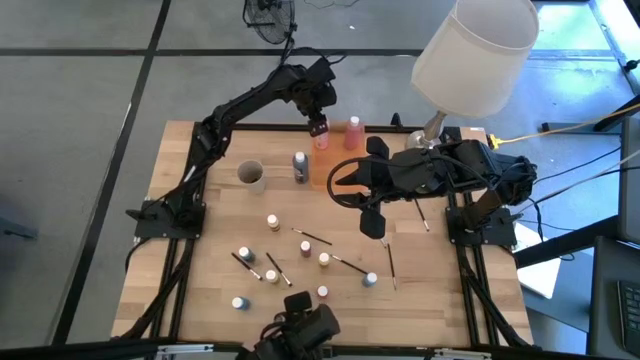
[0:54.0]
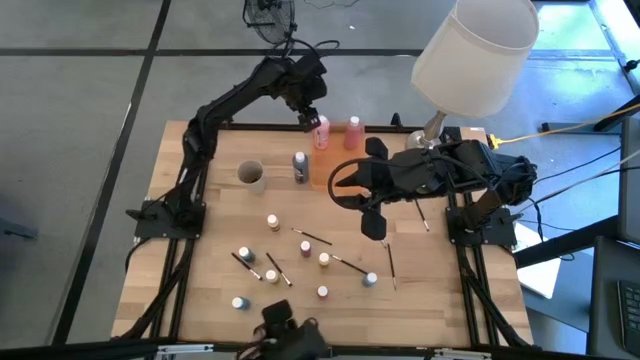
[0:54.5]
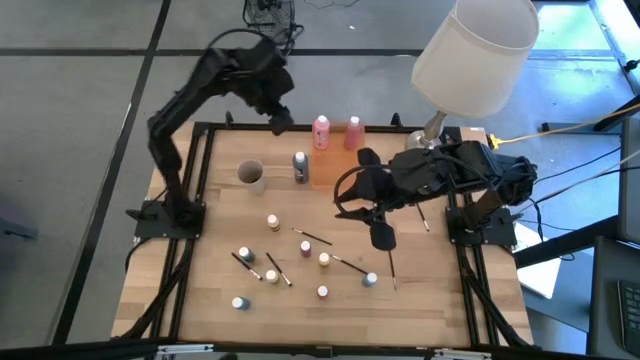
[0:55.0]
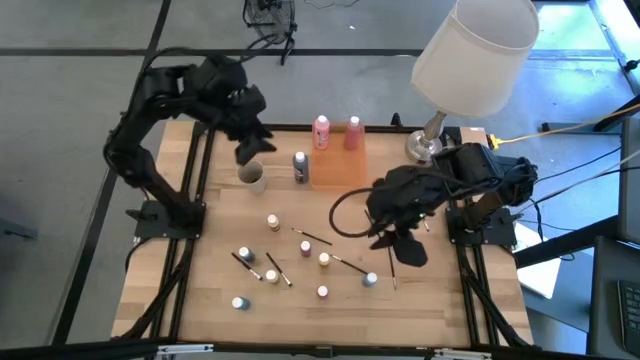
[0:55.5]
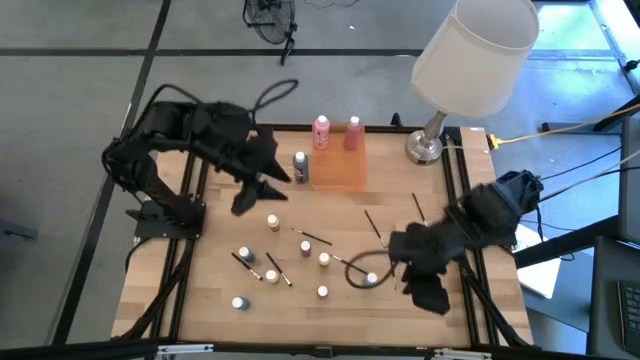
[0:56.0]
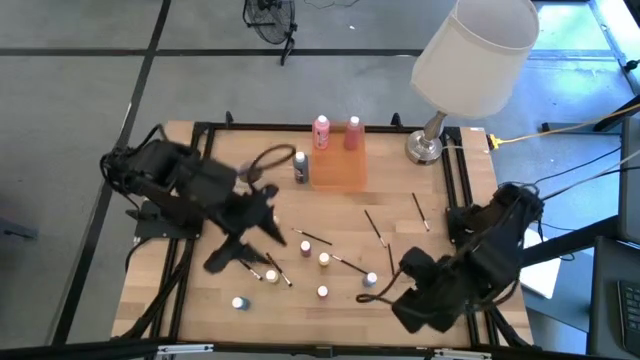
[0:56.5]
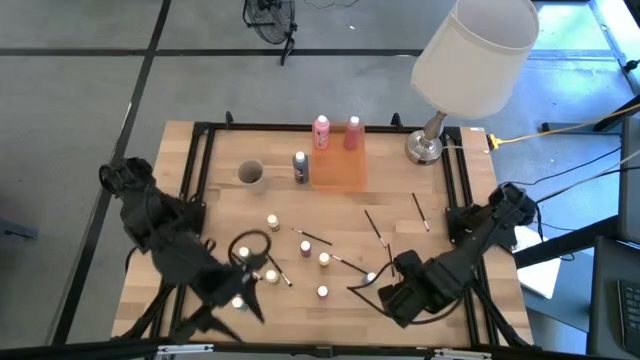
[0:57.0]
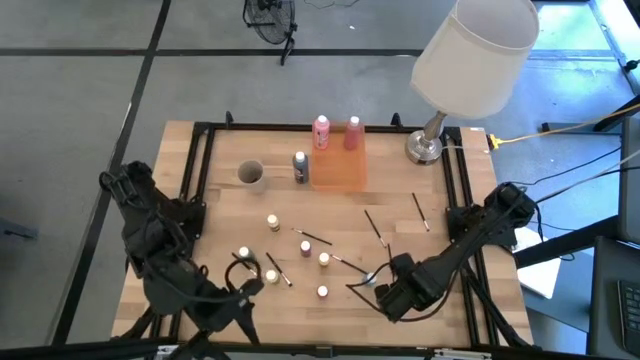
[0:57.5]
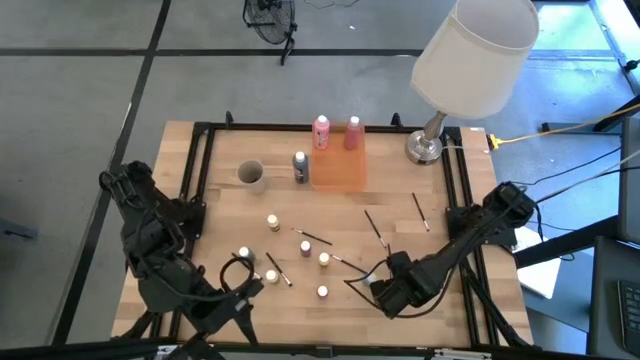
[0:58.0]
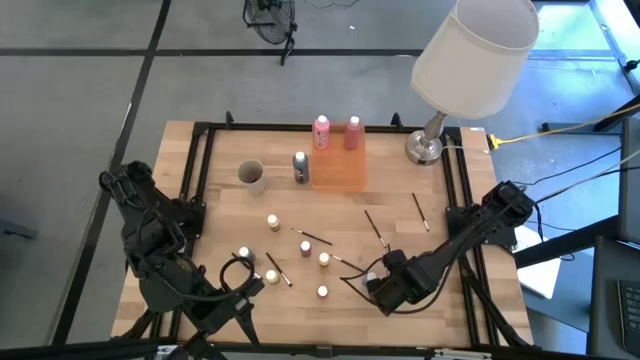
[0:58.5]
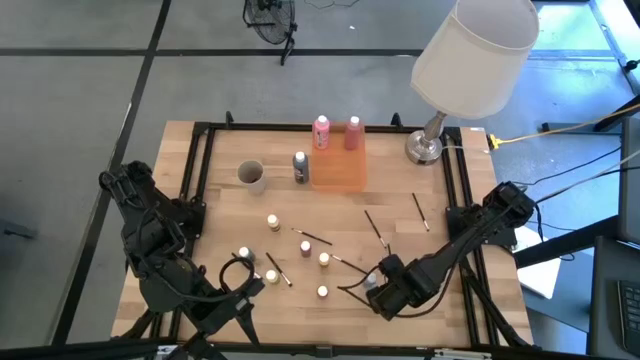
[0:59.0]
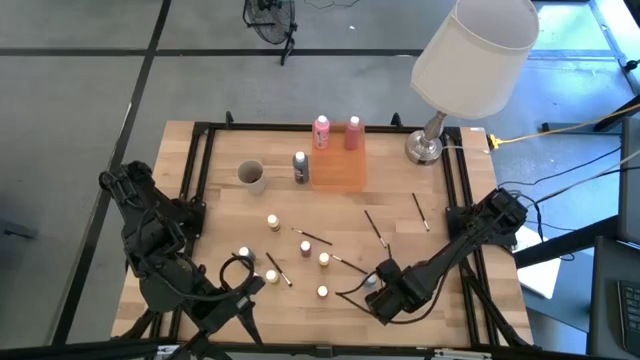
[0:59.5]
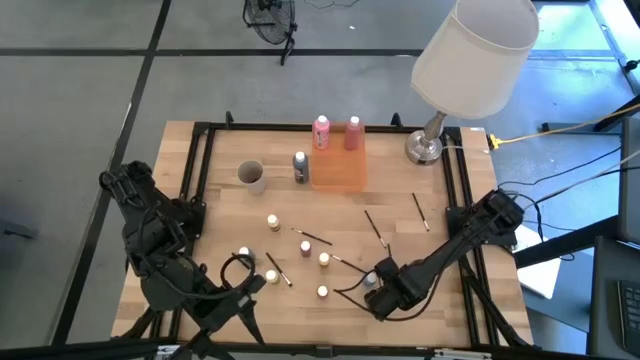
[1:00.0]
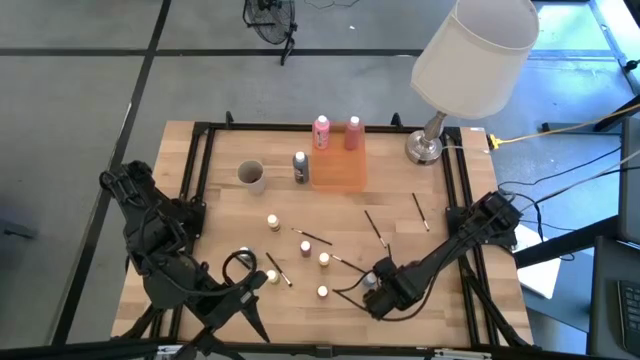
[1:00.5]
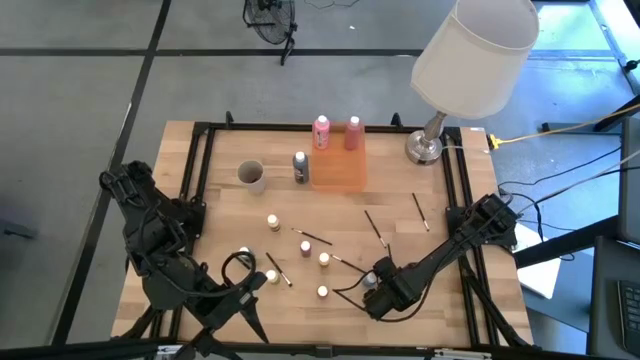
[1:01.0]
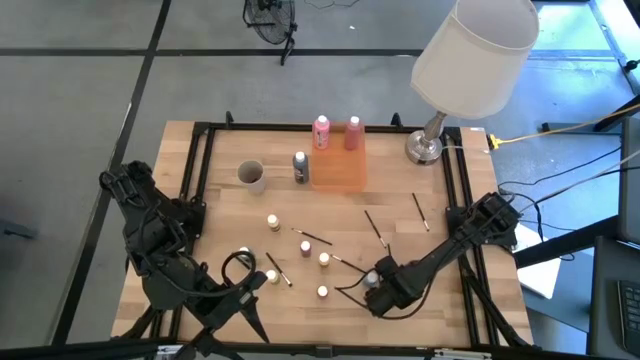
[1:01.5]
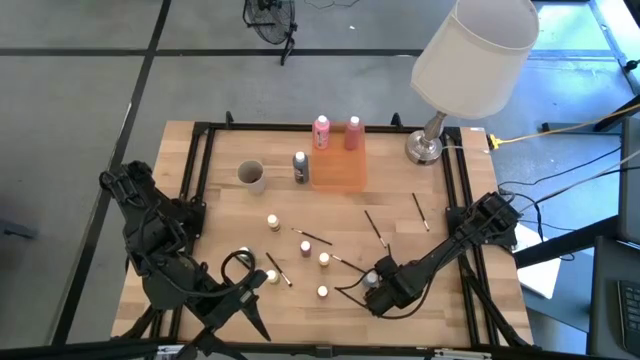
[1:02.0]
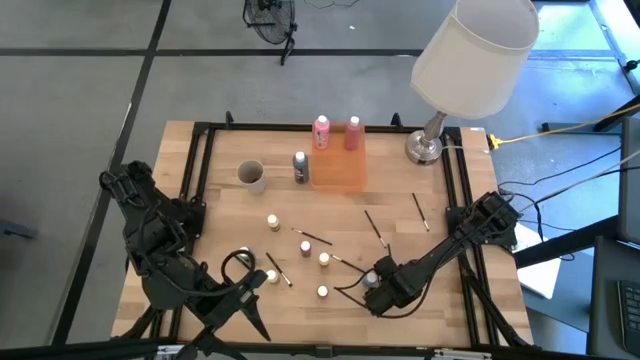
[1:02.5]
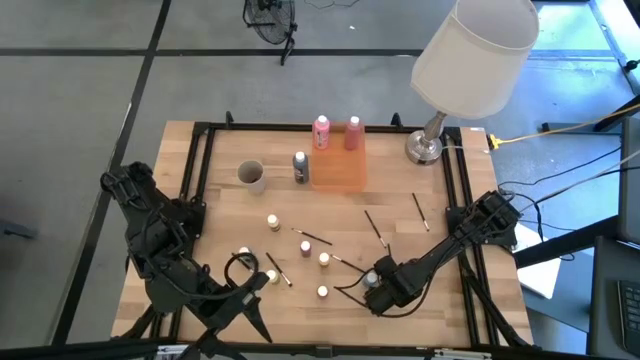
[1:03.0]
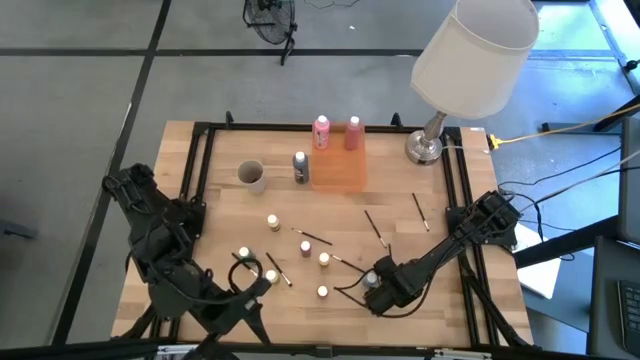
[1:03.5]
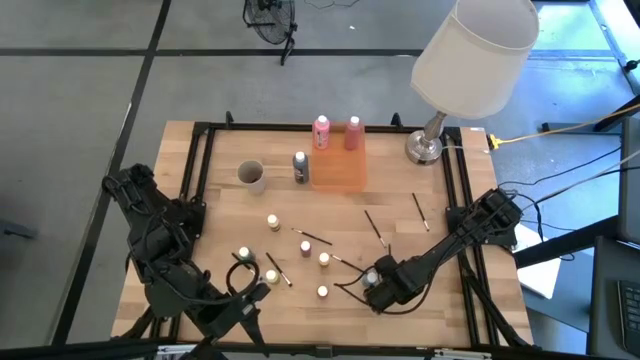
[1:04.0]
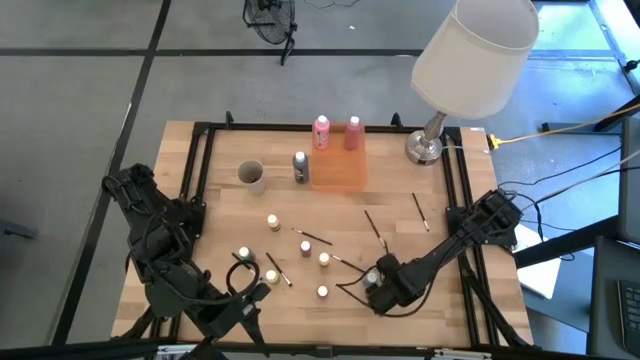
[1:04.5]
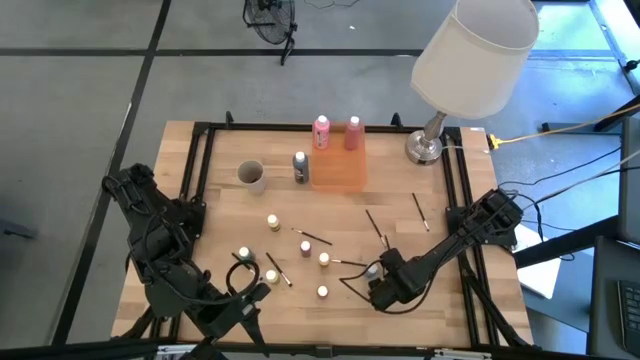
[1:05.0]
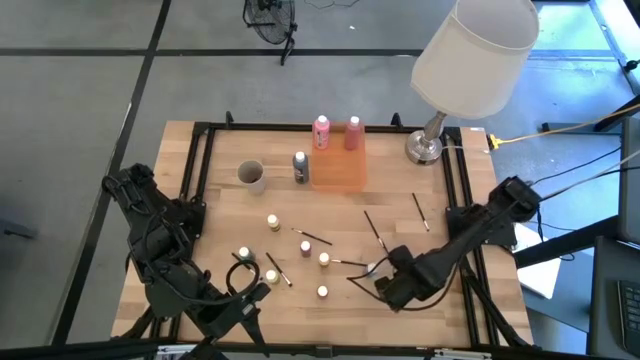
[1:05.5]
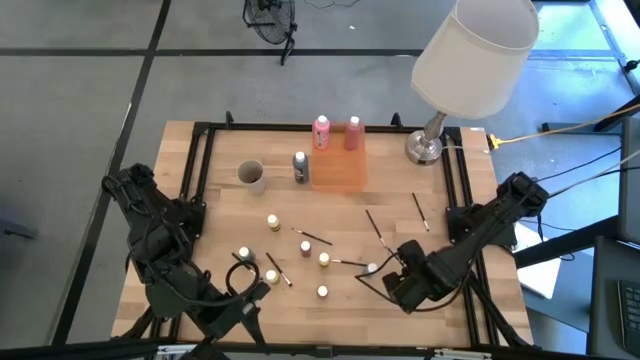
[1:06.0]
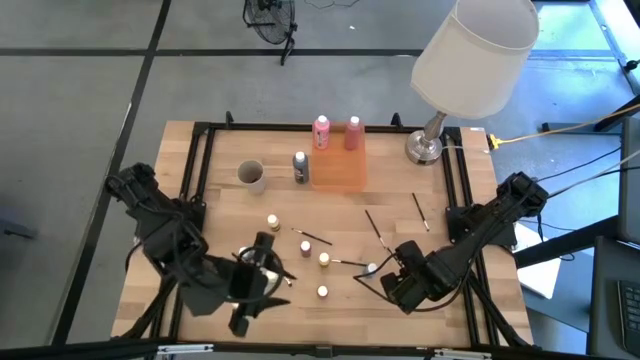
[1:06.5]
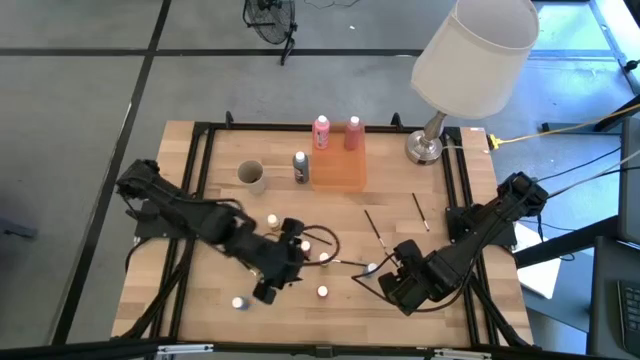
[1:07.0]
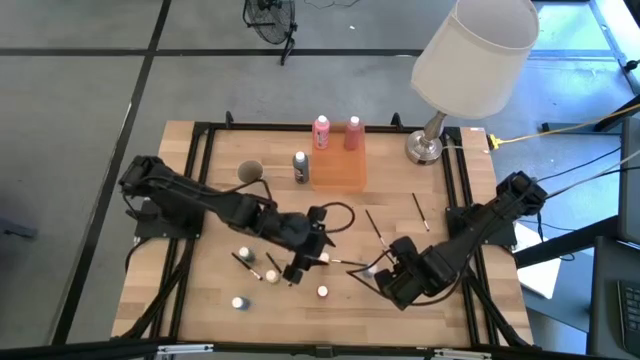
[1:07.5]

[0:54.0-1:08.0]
Task: Pick & Place Paint Supplies
Put the silver paint brush into the white cup

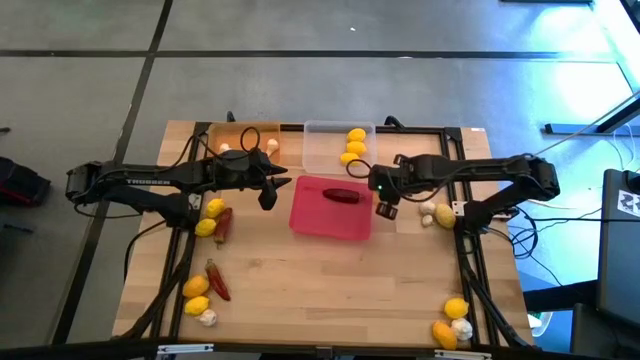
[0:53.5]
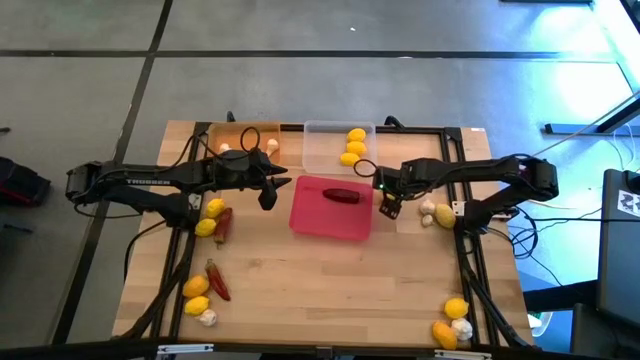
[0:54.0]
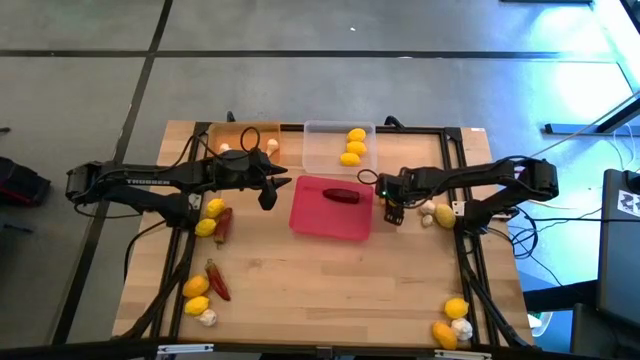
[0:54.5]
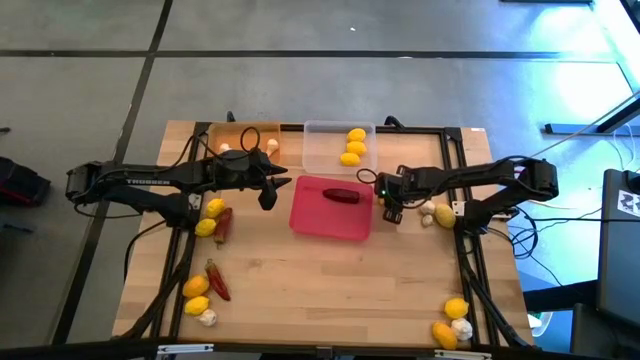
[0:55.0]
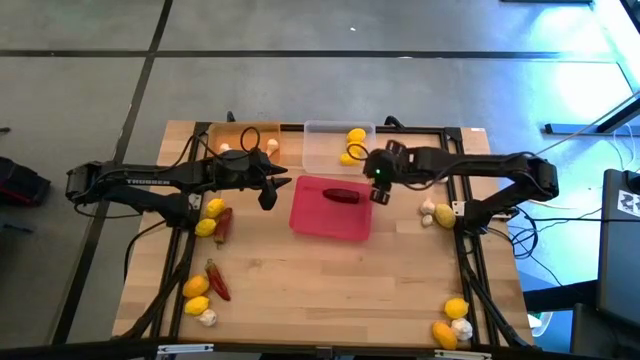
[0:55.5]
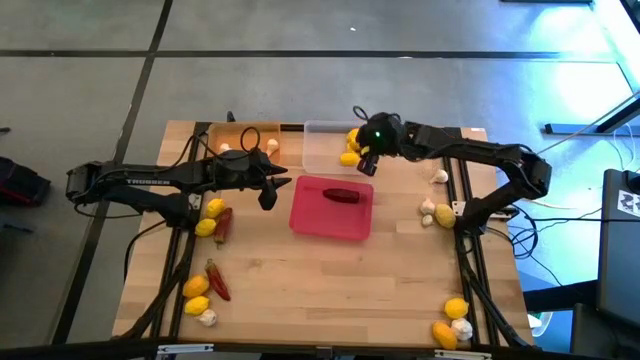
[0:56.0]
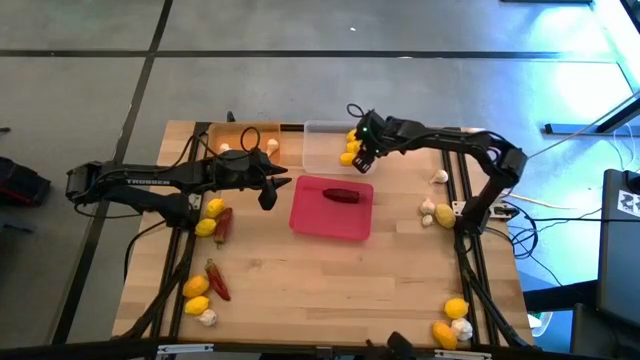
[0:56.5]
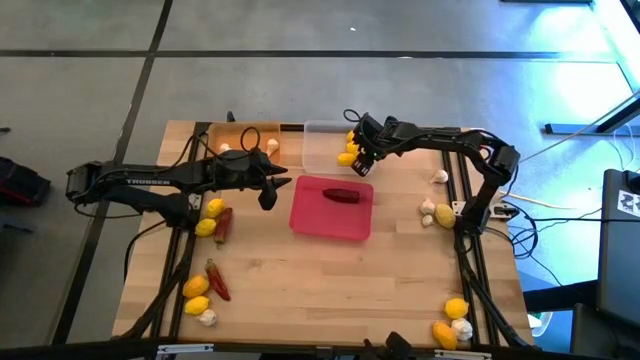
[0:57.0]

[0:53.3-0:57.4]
Task: Sort produce into baskets
Put the yellow lemon in the transparent bin
